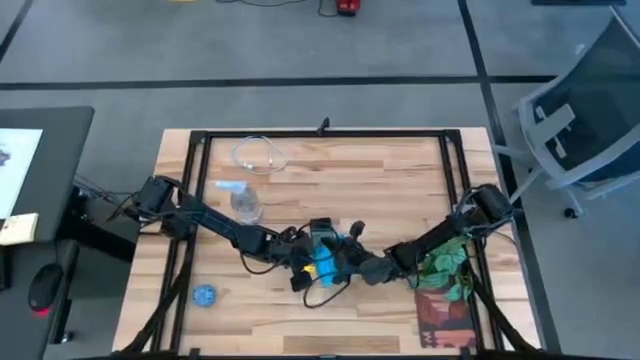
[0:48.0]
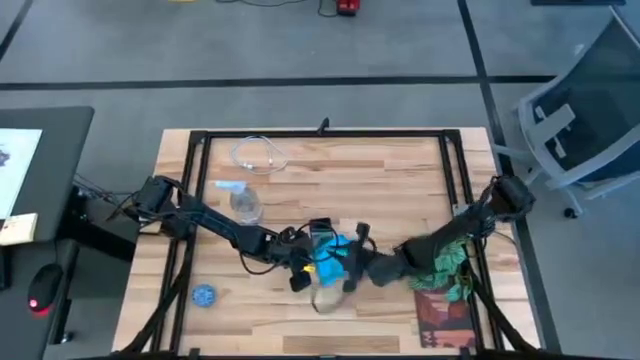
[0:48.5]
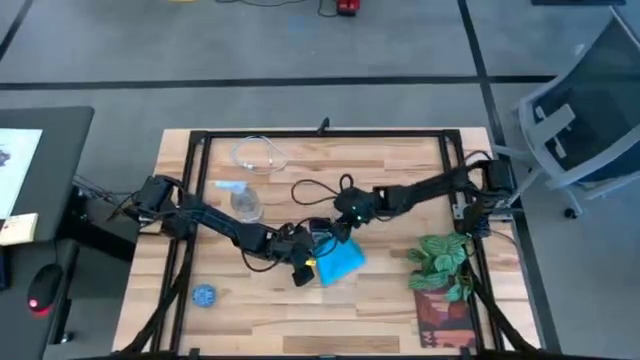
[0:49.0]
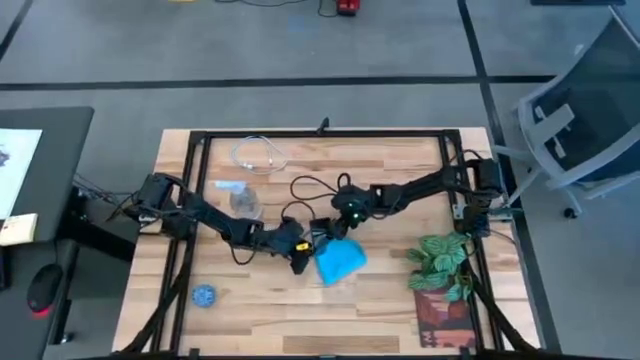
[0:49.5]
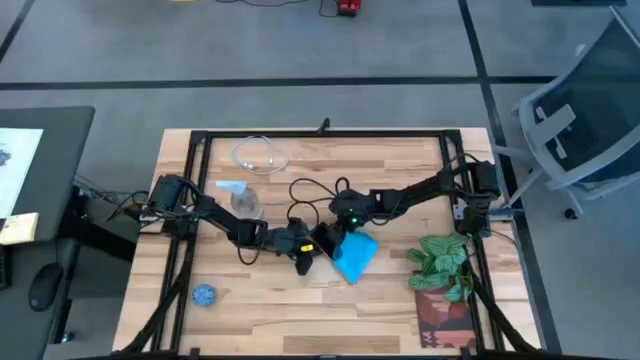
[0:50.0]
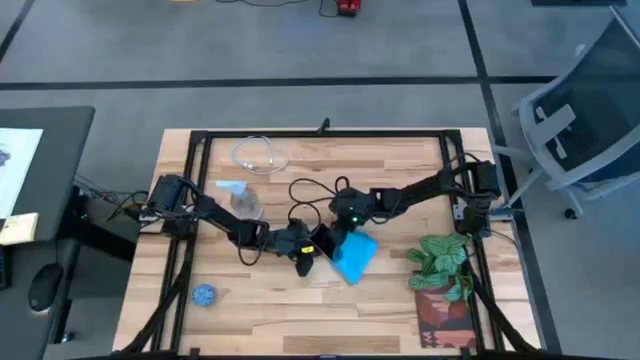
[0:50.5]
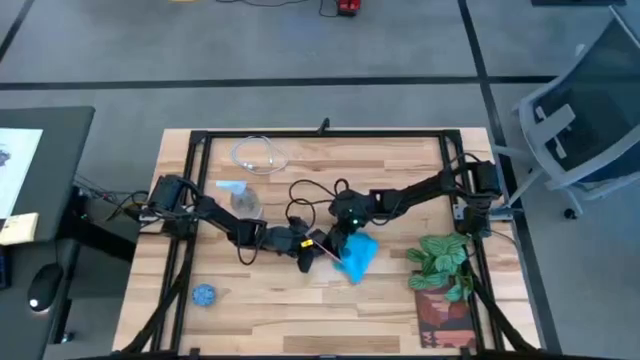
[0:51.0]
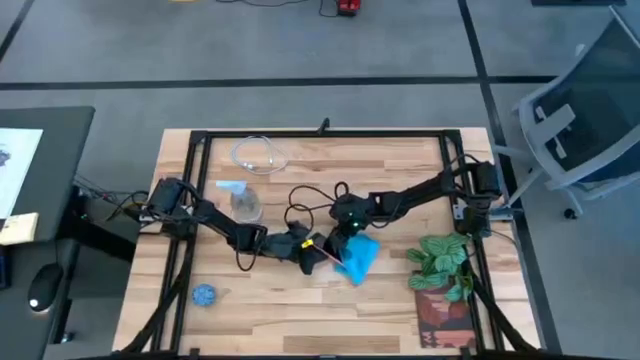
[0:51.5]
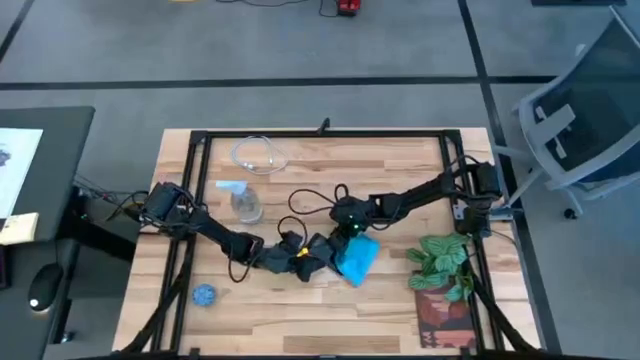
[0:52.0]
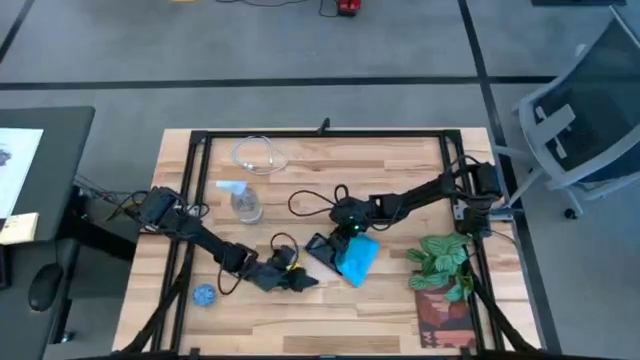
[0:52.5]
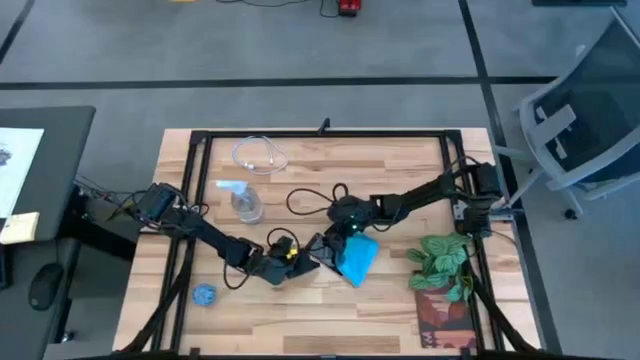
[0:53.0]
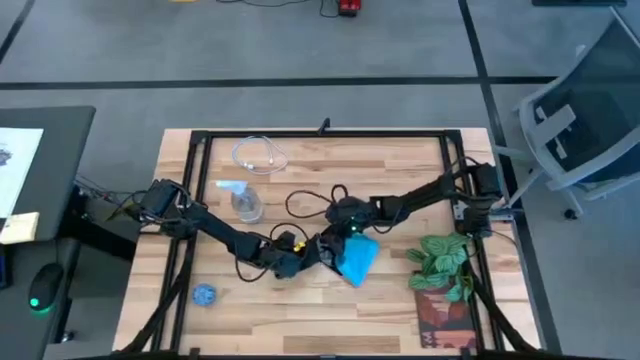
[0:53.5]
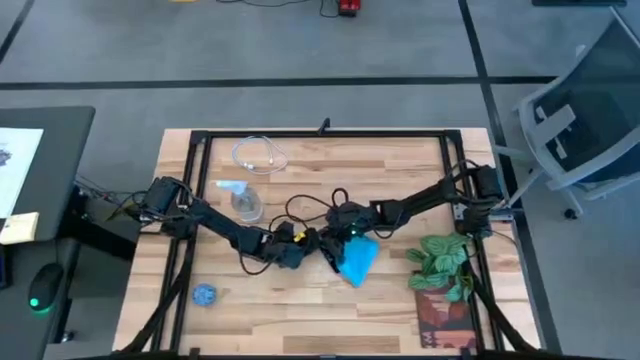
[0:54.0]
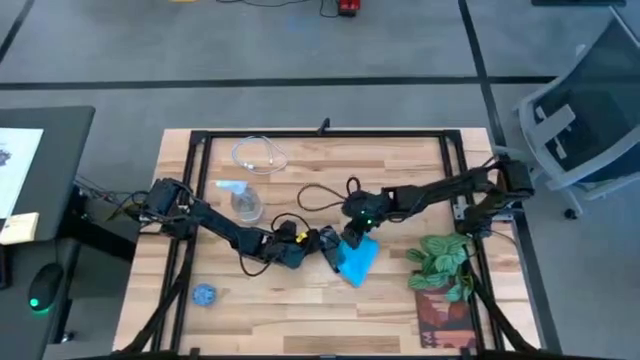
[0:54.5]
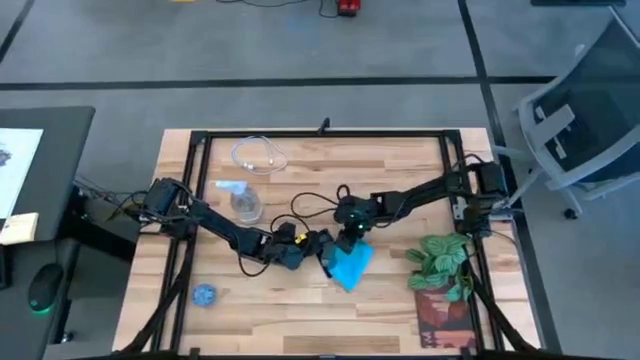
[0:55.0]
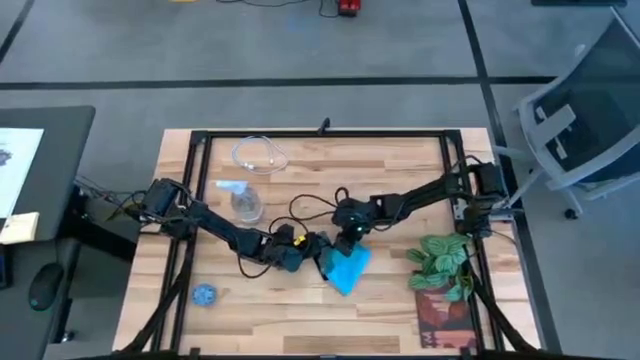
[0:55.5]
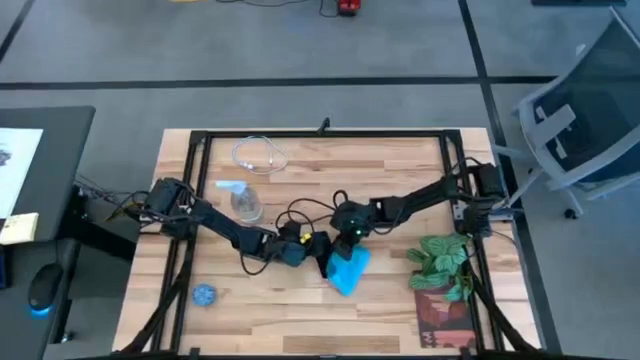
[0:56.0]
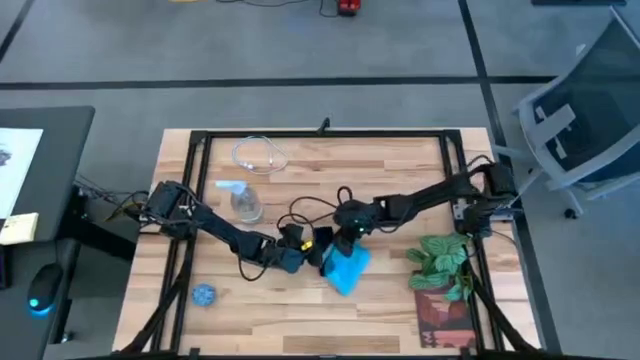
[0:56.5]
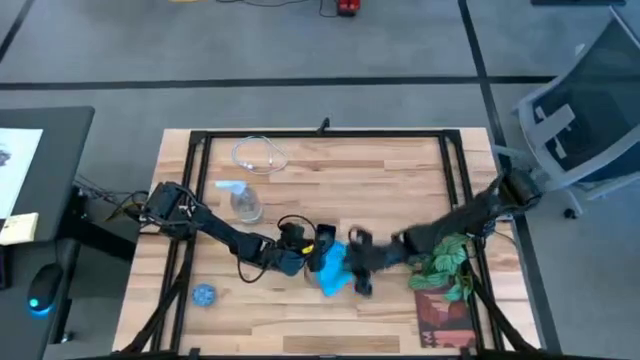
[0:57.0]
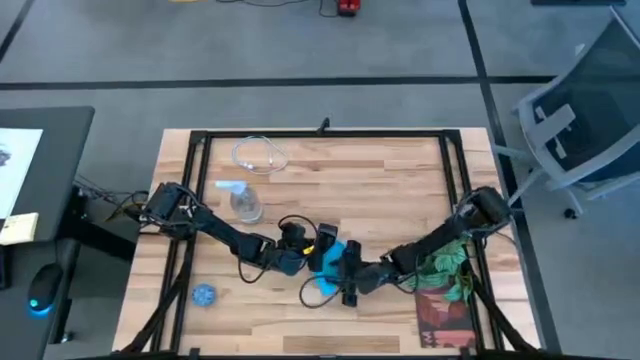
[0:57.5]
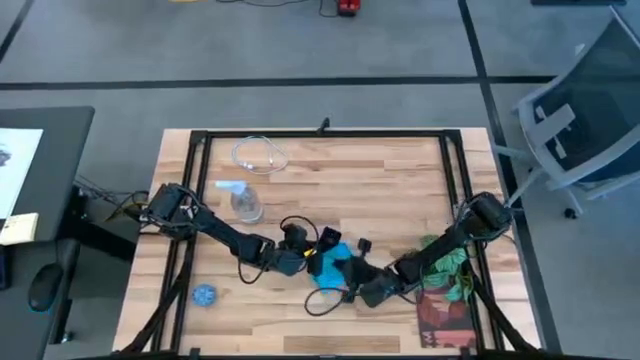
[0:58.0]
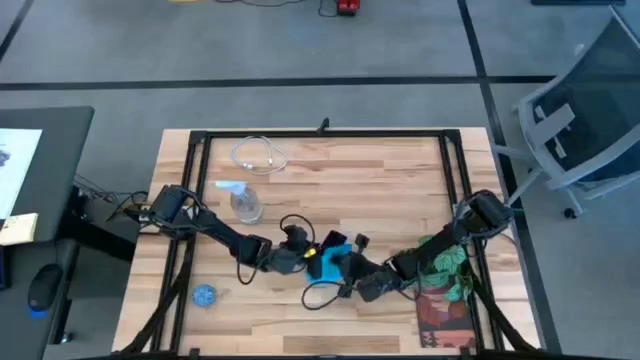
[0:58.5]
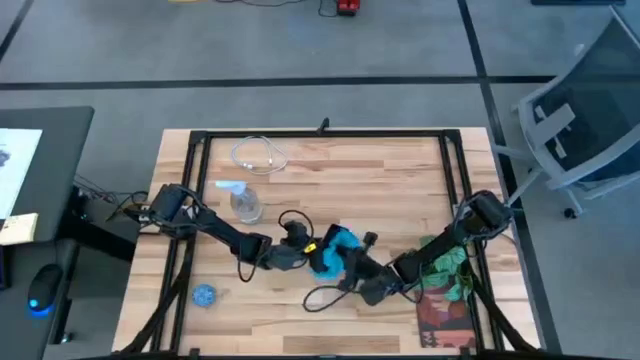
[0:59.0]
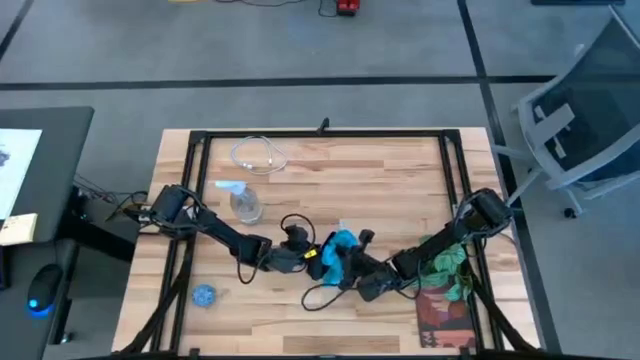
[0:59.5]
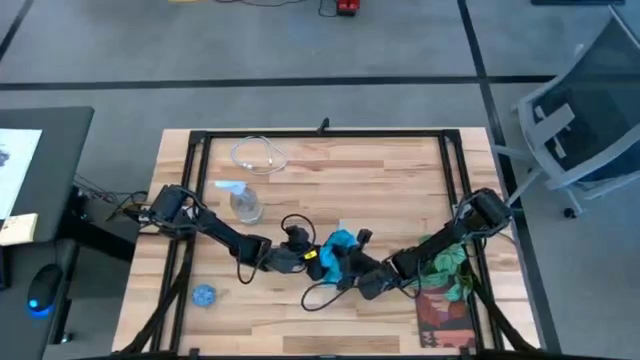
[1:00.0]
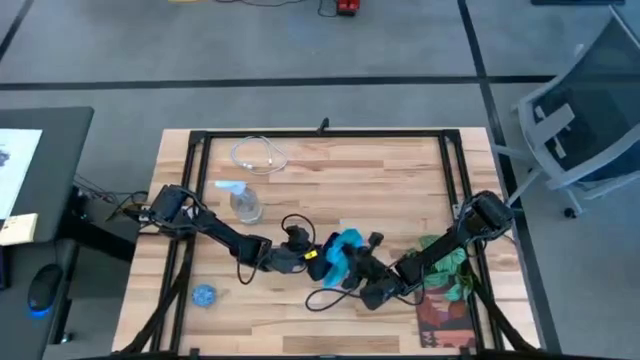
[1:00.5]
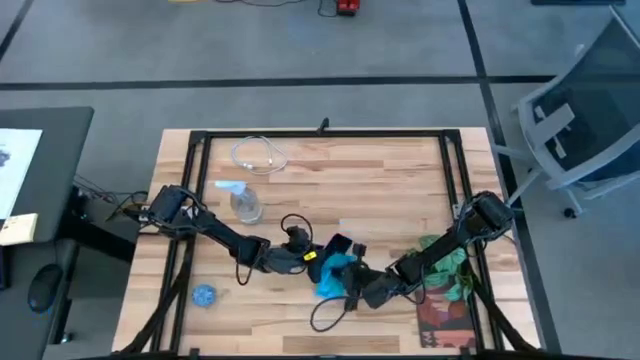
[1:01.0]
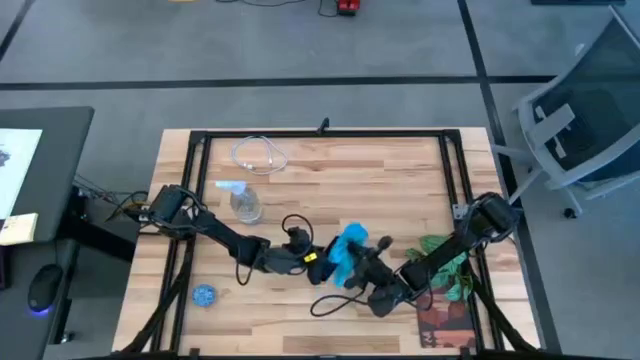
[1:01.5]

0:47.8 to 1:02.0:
Task: Apply microfiber cloth
Wipe the front of the cellphone with a microfiber cloth

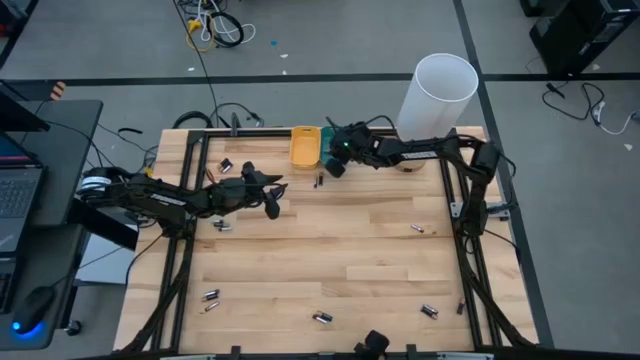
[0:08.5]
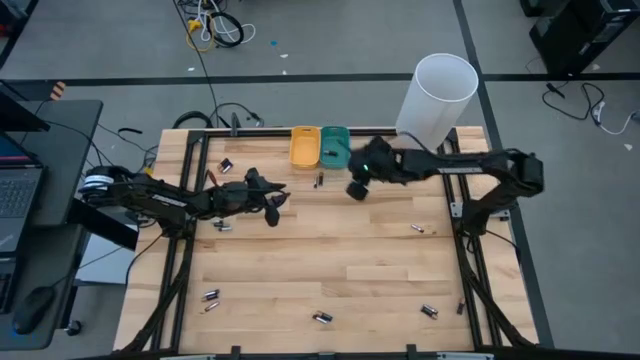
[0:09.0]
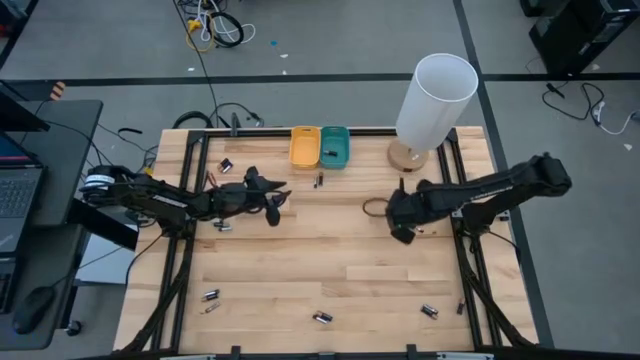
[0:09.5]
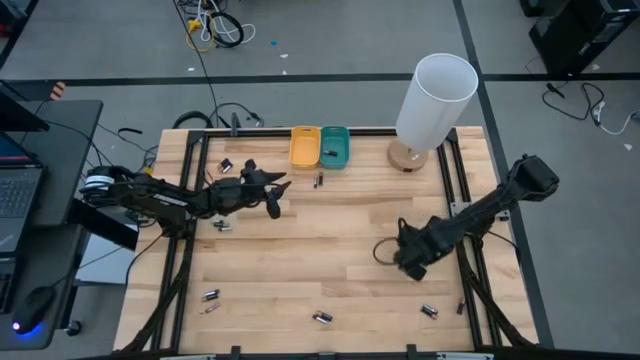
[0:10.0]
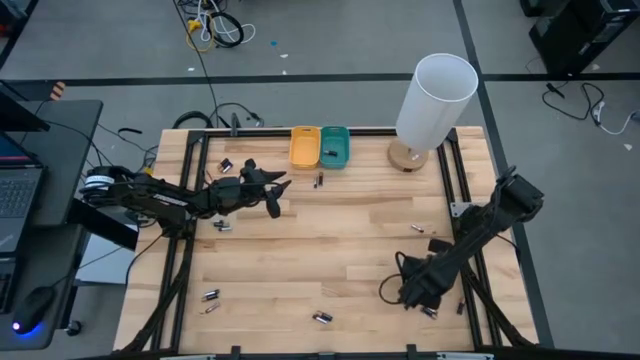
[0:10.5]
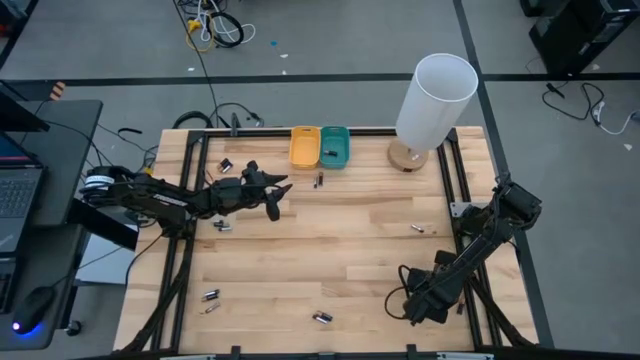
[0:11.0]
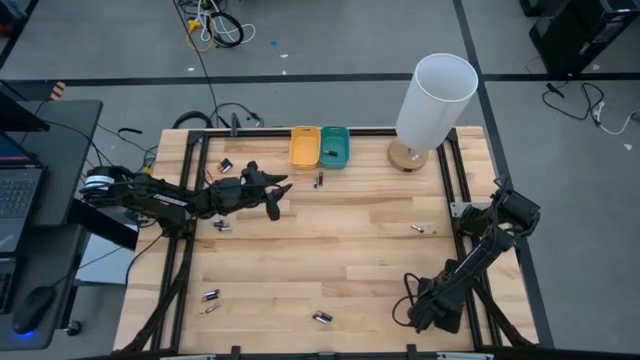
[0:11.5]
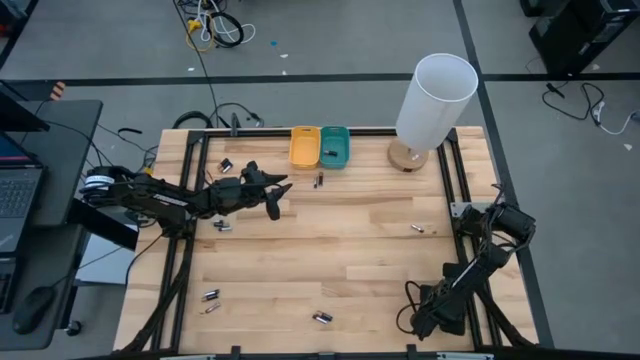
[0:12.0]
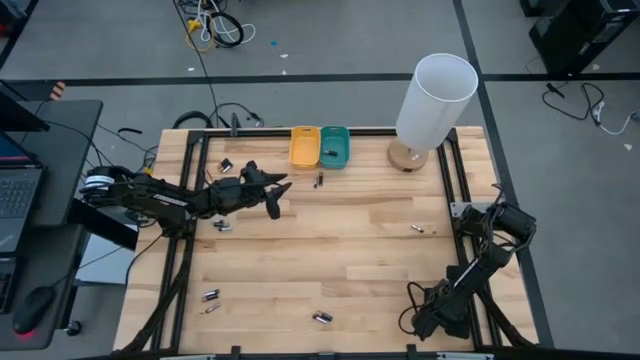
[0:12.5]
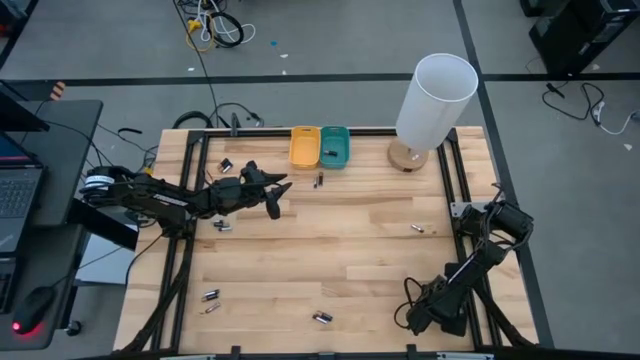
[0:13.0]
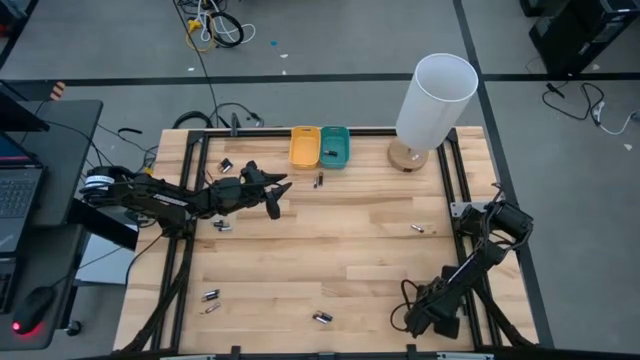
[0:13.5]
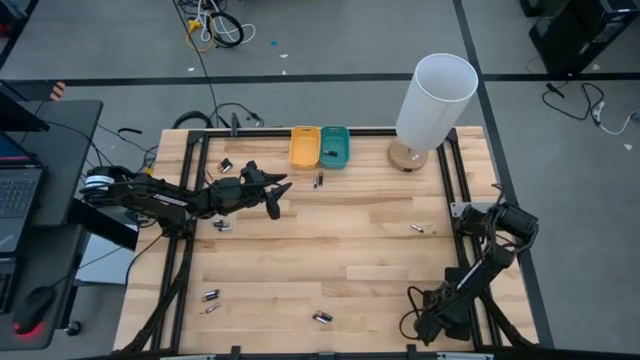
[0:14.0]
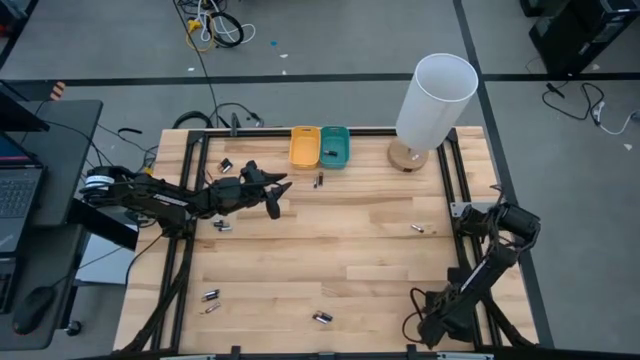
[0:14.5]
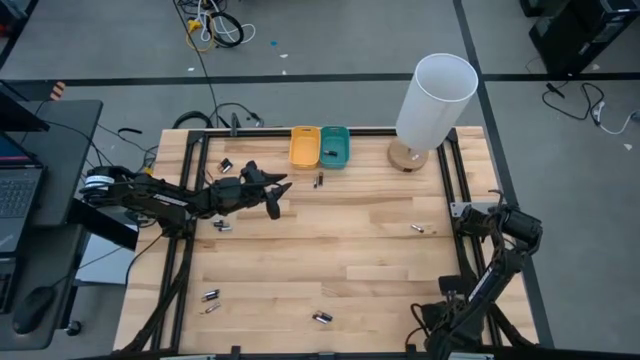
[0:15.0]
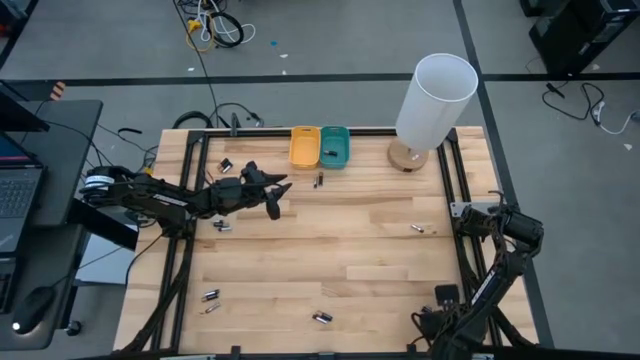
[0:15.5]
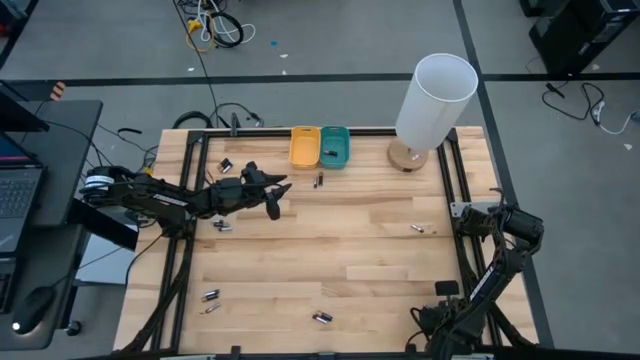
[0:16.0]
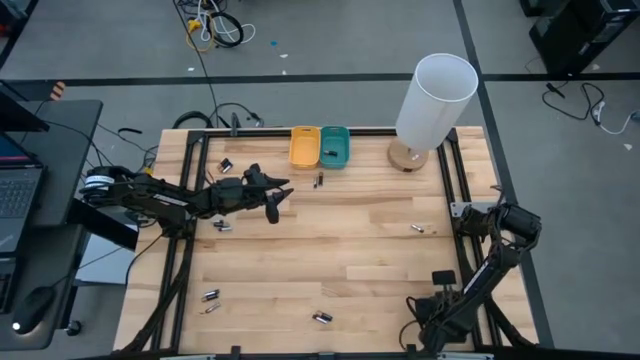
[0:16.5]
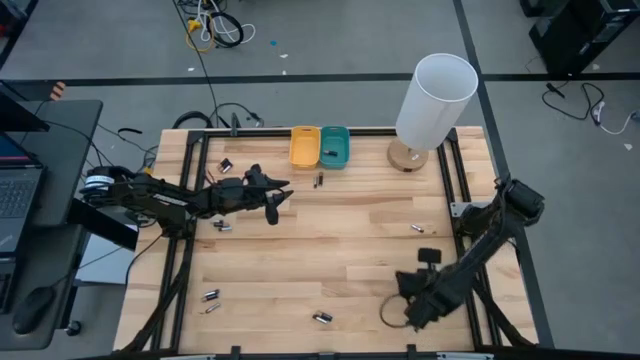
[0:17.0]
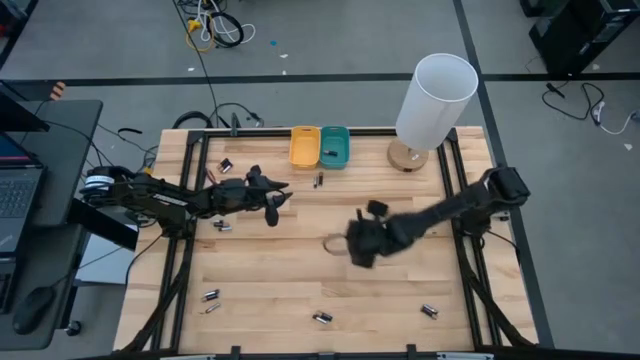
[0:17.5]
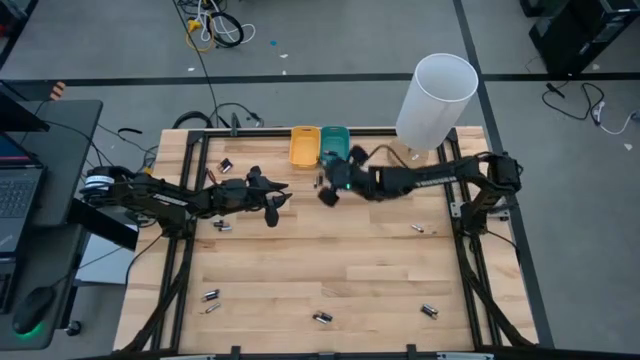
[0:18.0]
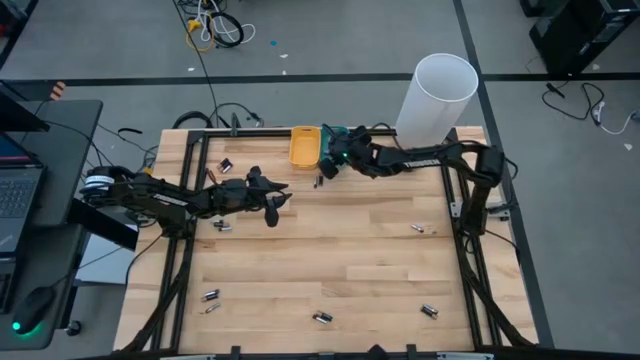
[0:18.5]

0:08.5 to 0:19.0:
Task: Sort batteries
Put the black battery into the green bin
